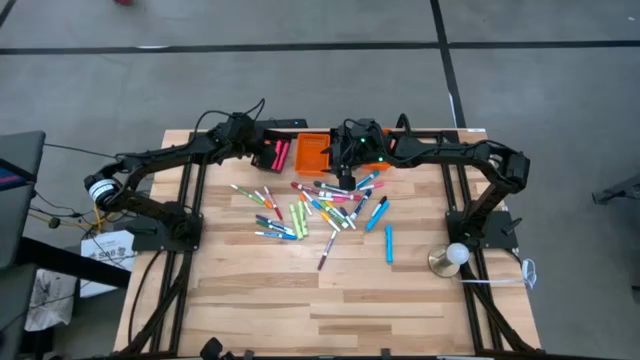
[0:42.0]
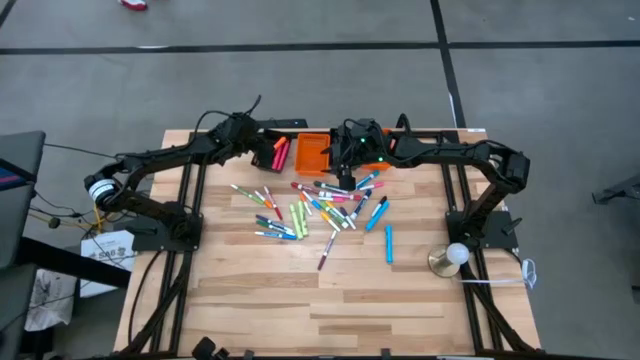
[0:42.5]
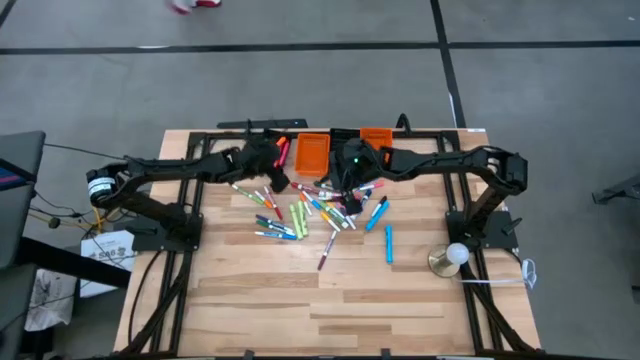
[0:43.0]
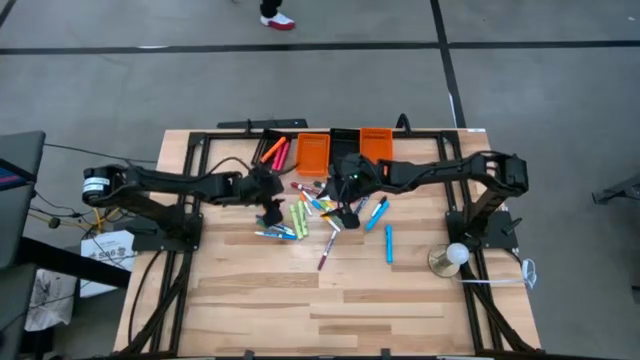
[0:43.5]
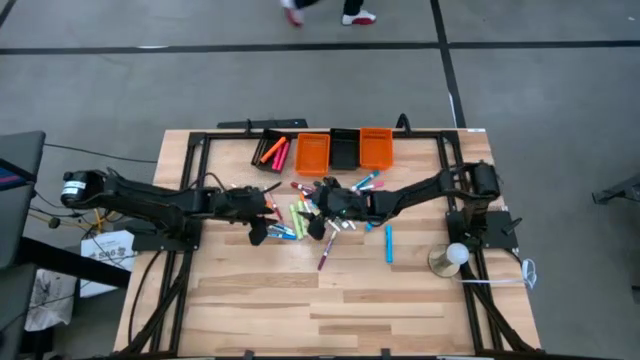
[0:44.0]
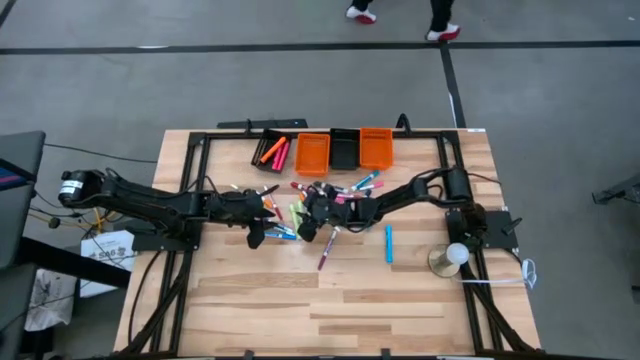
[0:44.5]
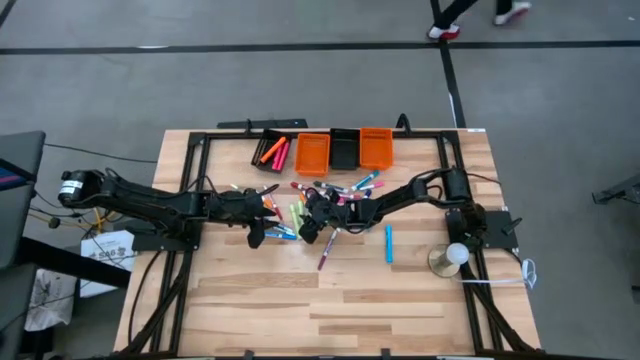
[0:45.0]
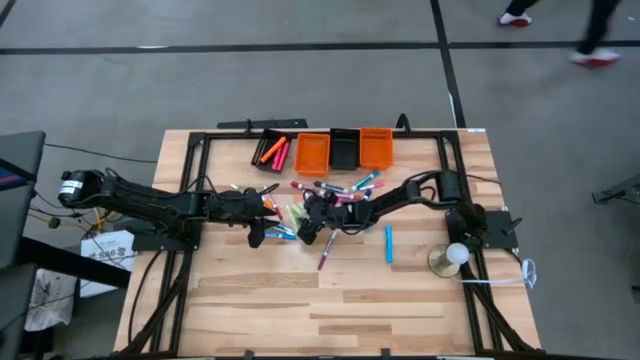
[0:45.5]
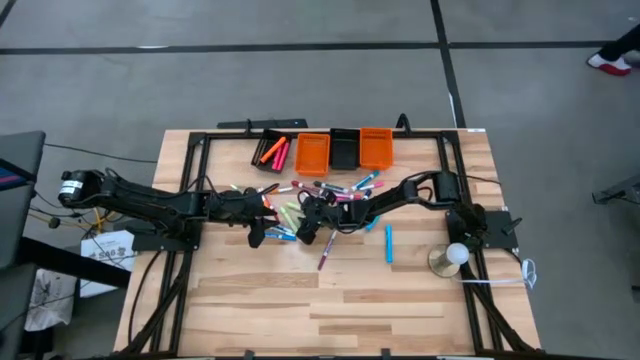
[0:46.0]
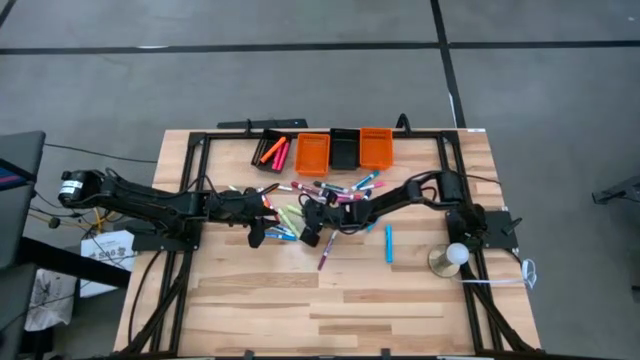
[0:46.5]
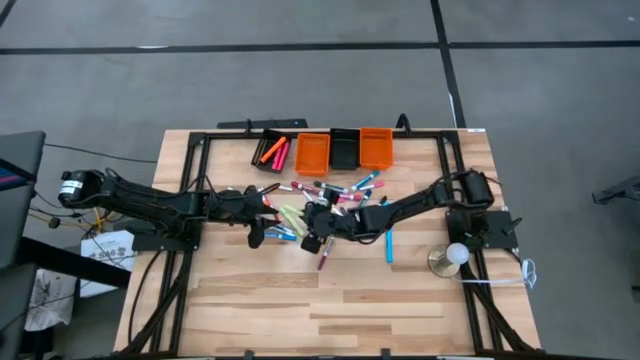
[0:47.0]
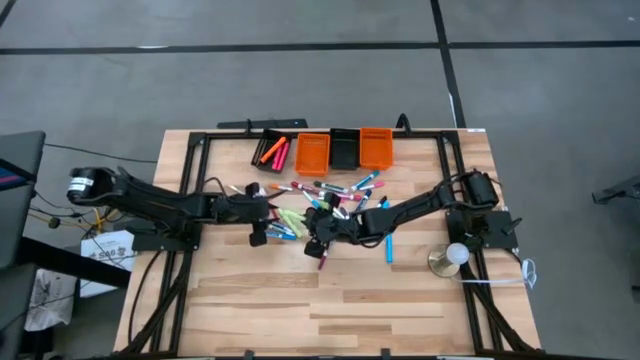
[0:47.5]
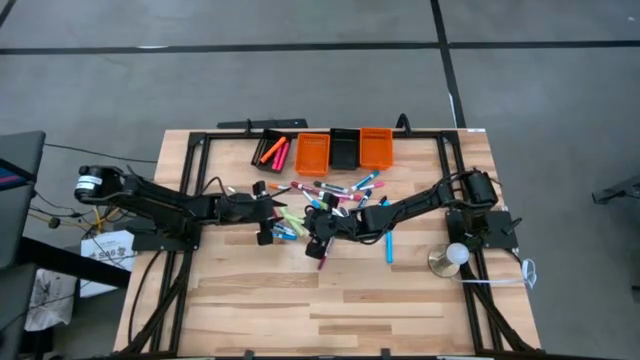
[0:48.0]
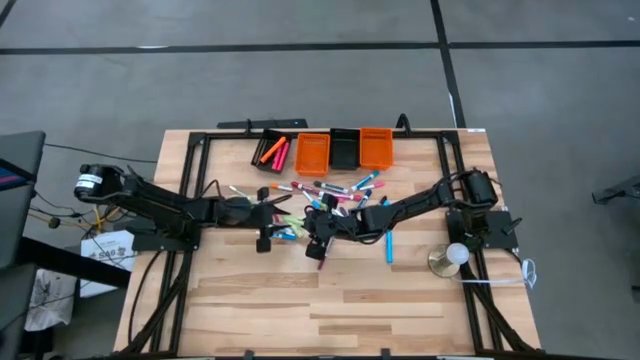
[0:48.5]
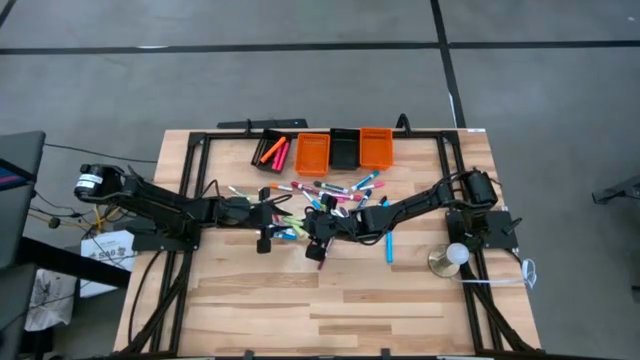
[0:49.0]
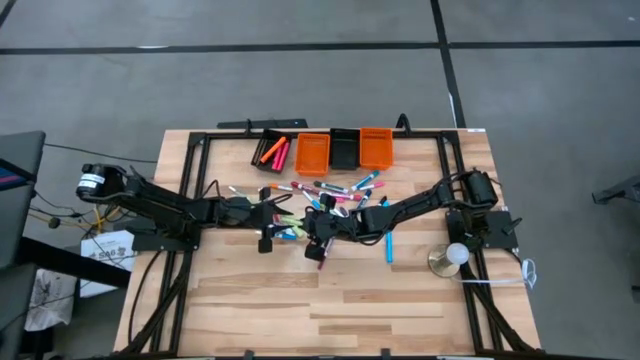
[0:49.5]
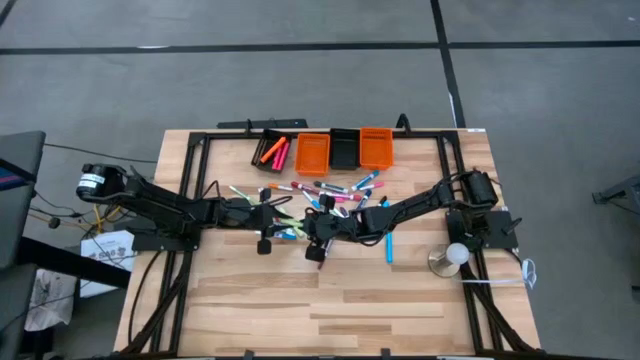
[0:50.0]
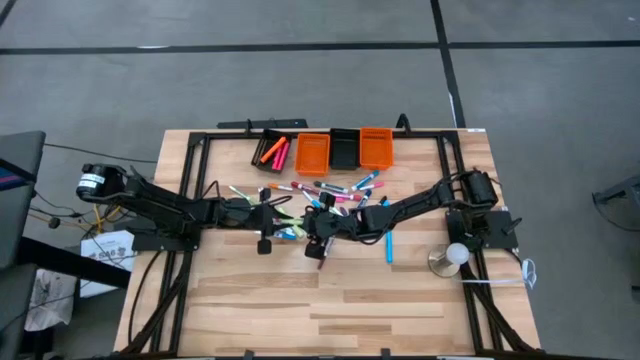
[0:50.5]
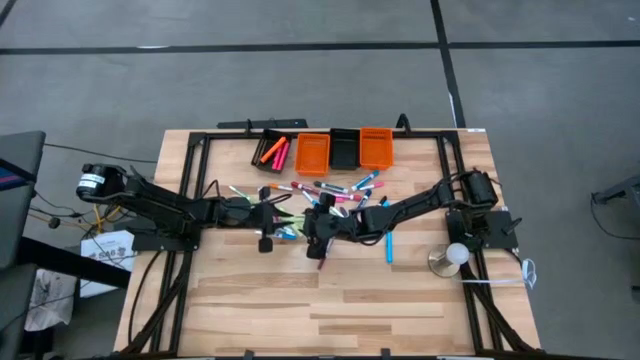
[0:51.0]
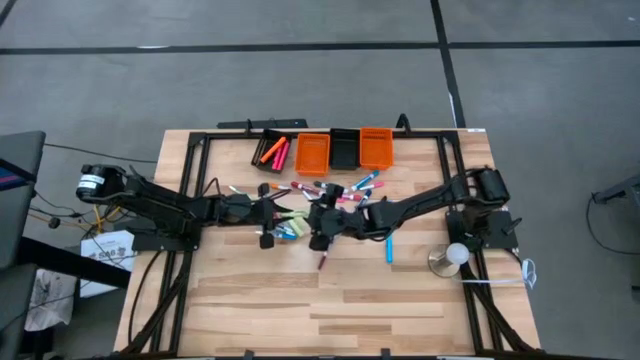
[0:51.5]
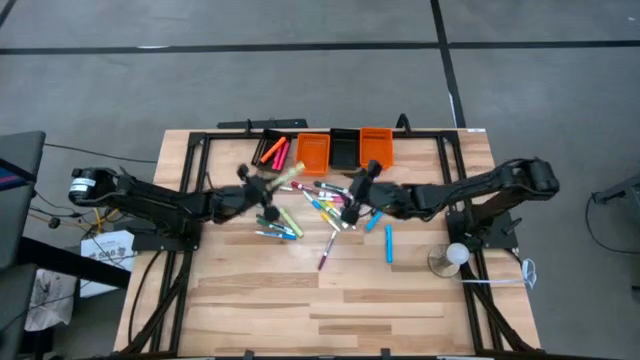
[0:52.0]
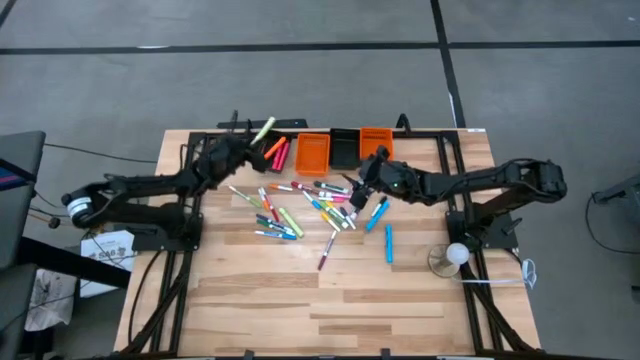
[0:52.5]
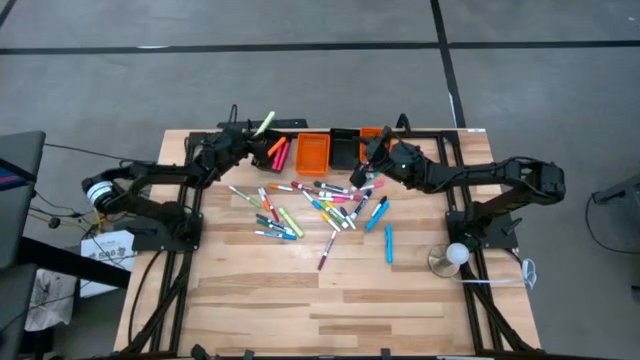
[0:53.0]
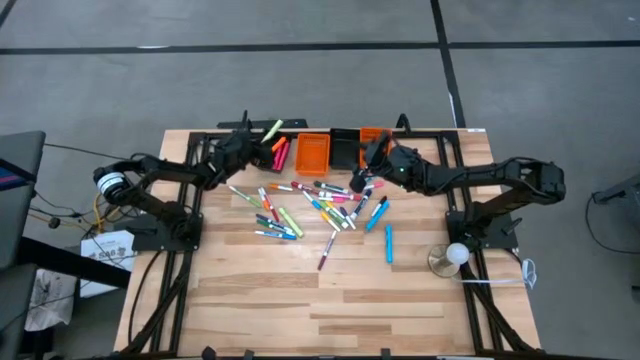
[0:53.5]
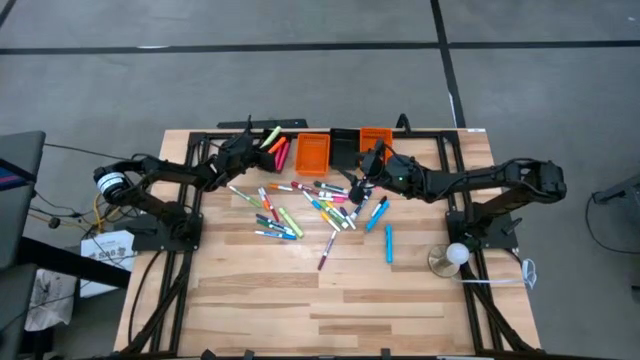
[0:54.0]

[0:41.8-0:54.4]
Task: Pick & Place Markers
Put the right big green highlighter pen into the left black basket

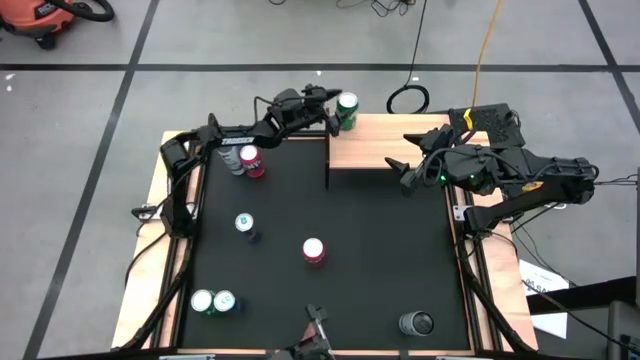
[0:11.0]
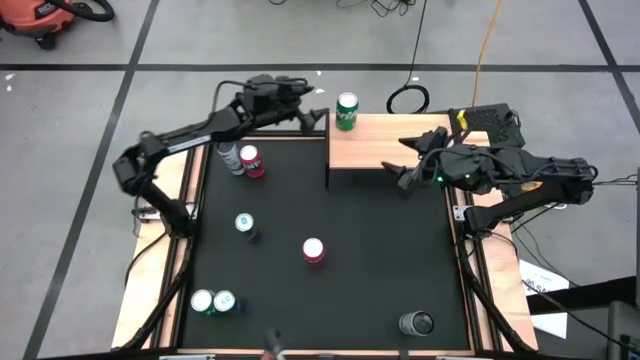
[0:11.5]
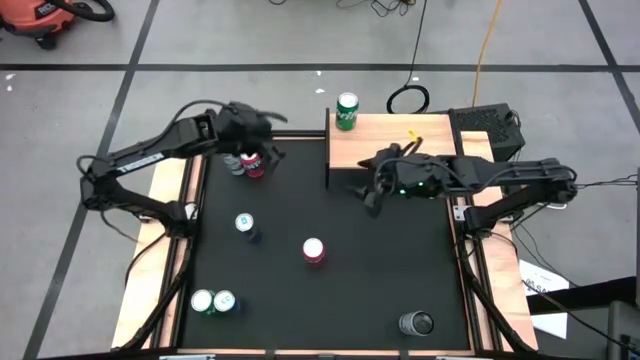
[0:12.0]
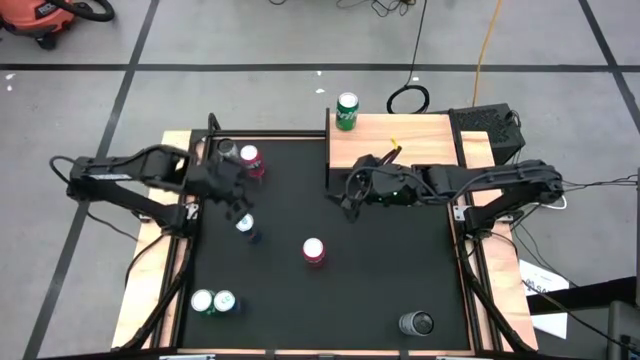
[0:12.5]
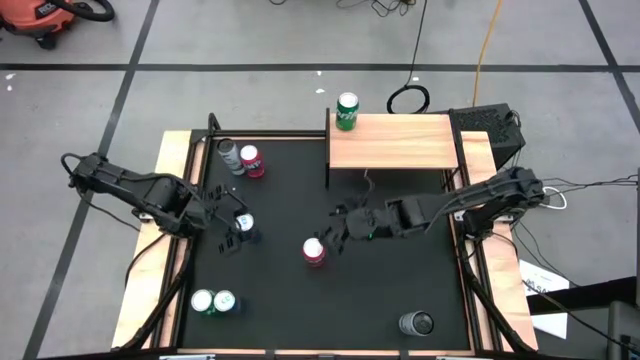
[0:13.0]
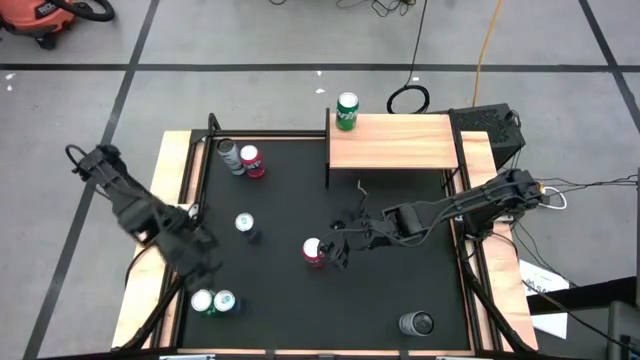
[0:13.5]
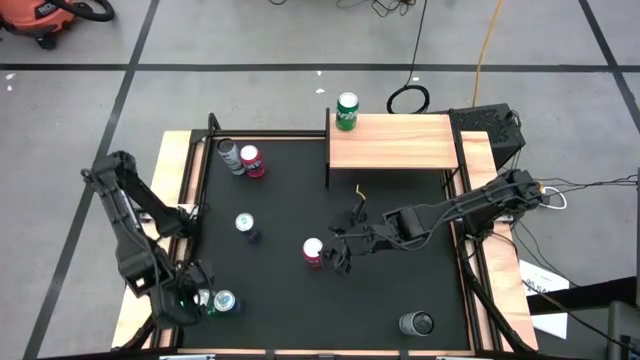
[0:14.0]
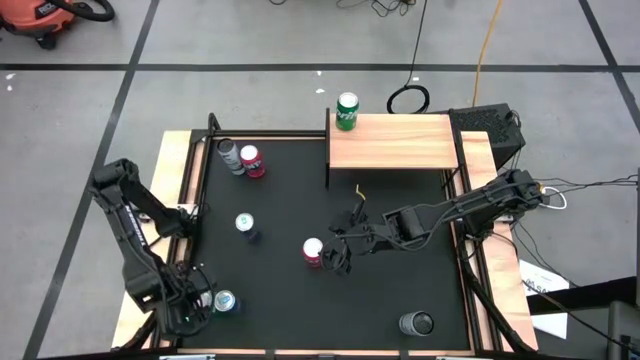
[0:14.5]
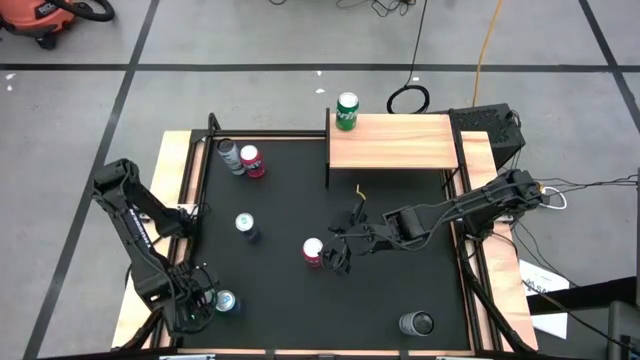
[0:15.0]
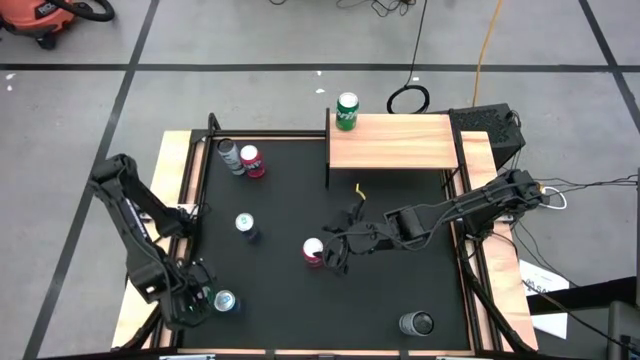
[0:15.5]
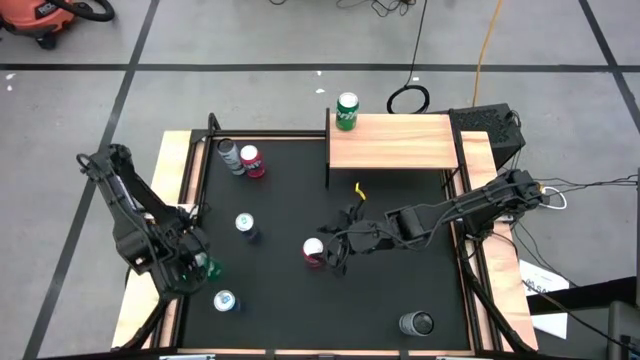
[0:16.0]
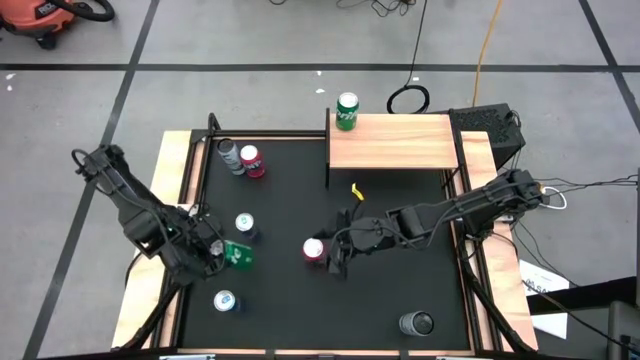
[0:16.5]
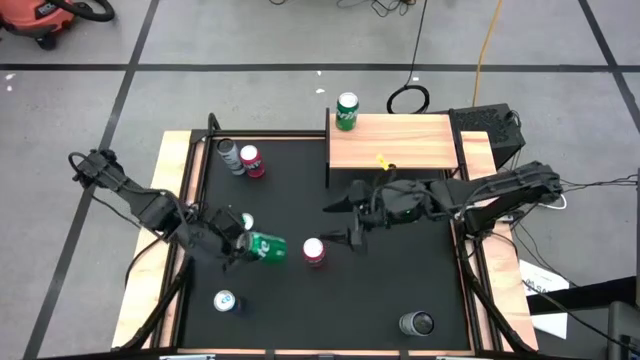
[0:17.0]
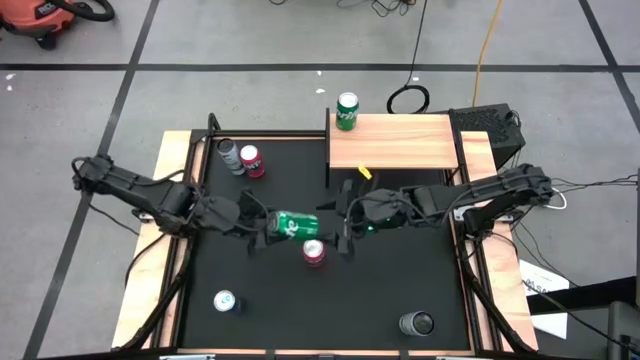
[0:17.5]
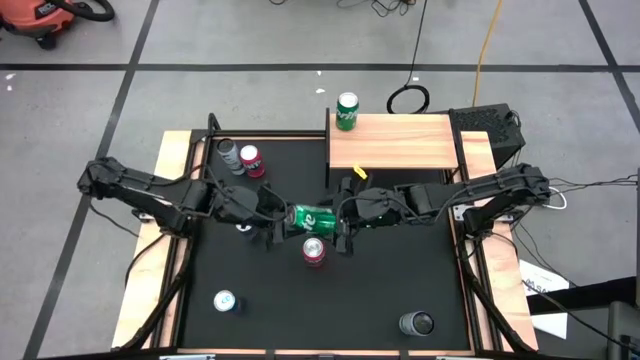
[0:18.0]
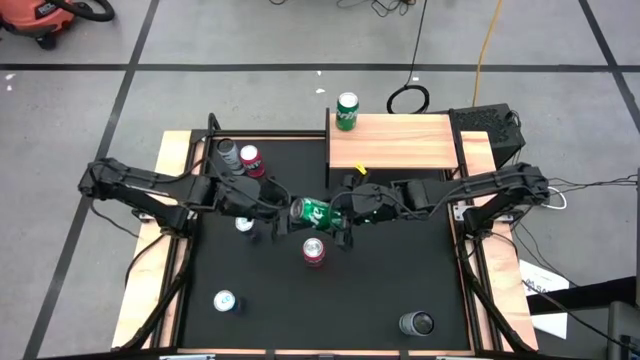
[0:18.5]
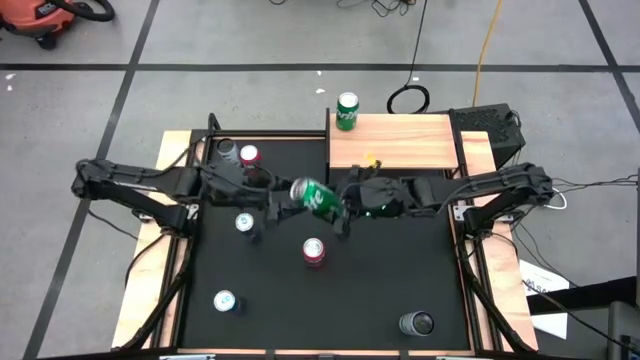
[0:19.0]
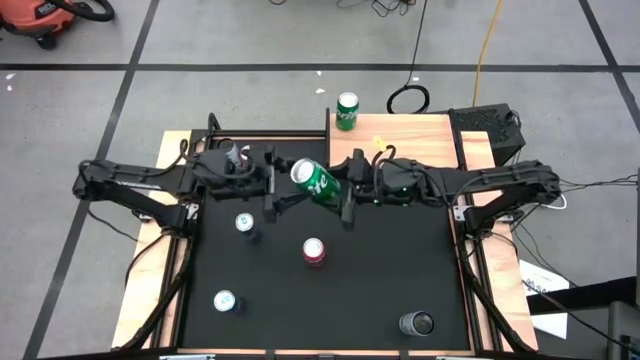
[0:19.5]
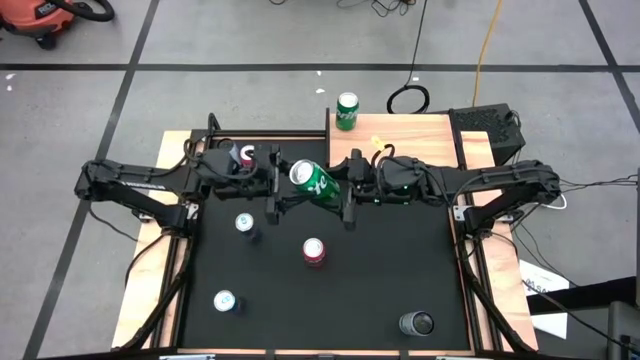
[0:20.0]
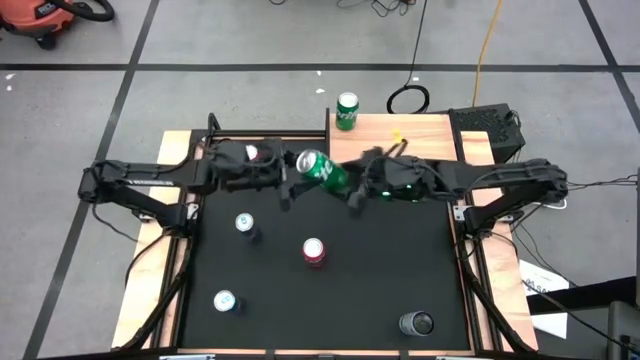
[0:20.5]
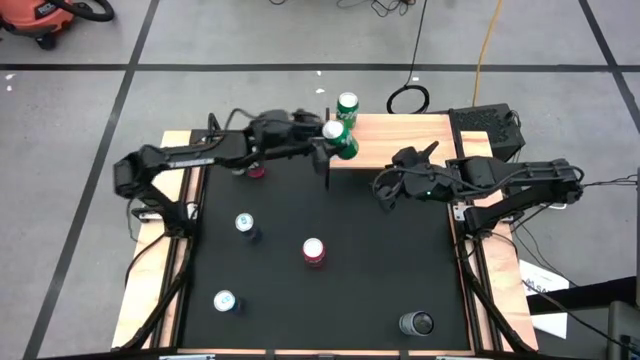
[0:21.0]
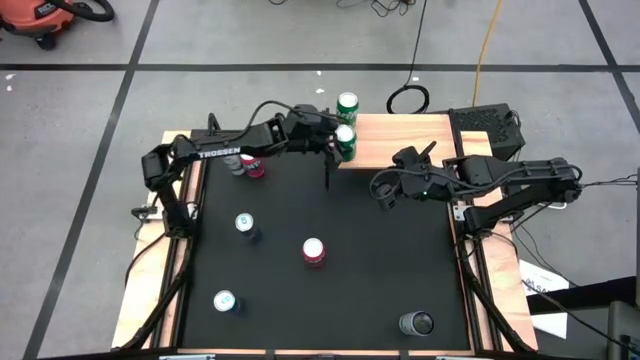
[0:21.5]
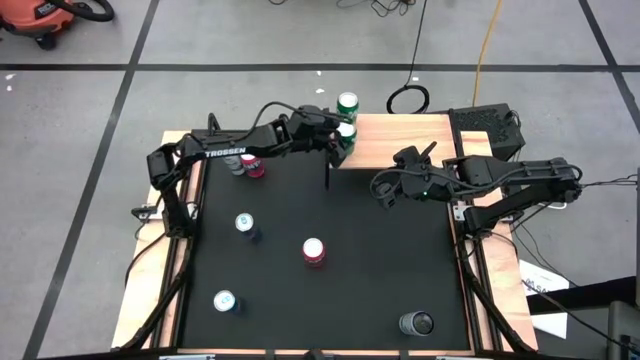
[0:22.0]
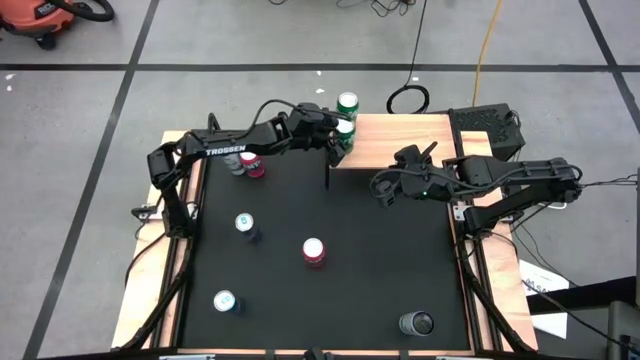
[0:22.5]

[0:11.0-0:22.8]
Task: Place canned beverage on shelf
Put the green soda can on the shelf aligned with the other green soda can
